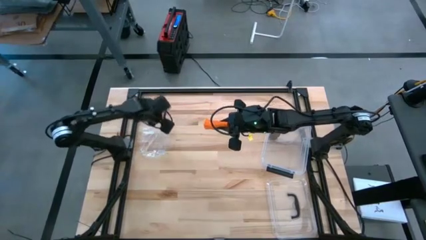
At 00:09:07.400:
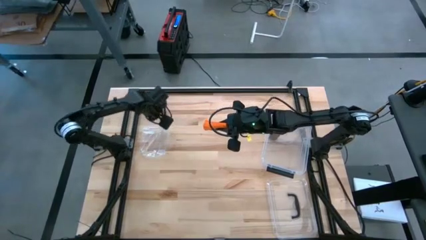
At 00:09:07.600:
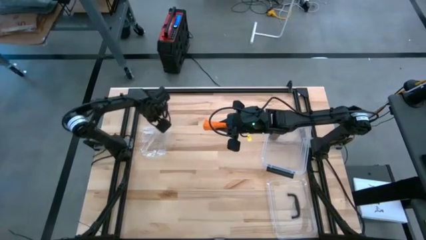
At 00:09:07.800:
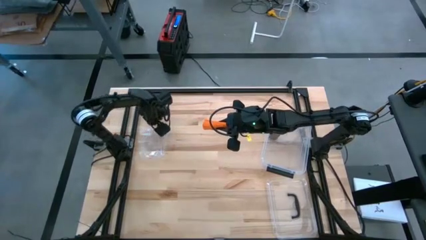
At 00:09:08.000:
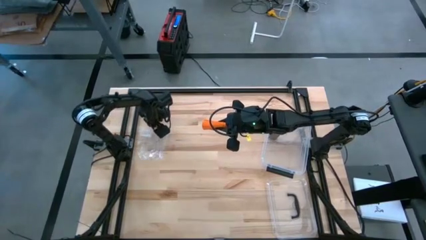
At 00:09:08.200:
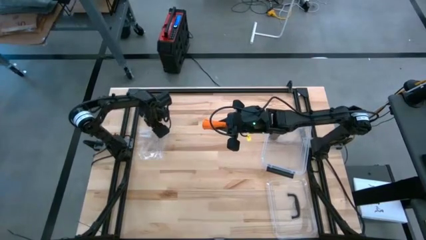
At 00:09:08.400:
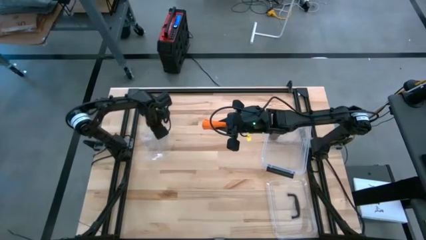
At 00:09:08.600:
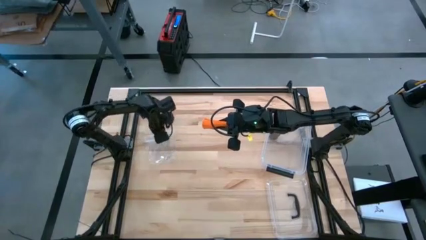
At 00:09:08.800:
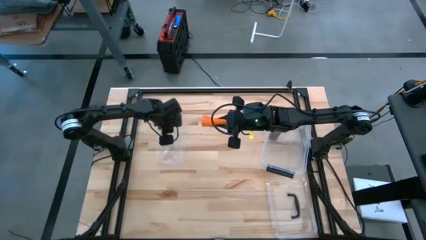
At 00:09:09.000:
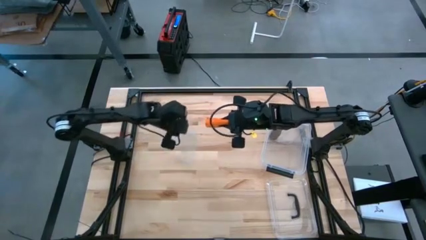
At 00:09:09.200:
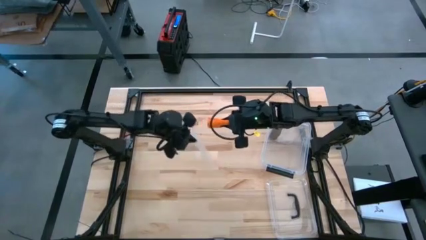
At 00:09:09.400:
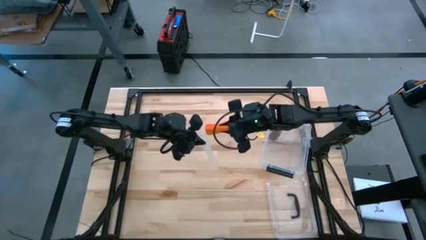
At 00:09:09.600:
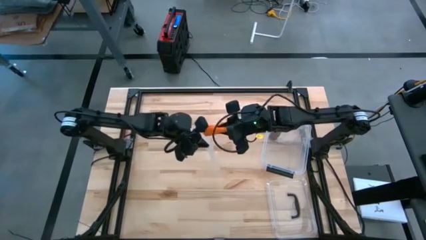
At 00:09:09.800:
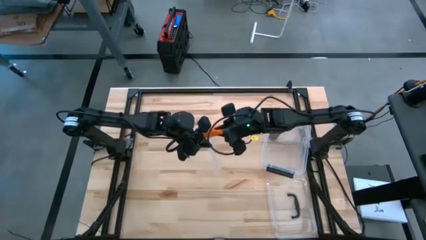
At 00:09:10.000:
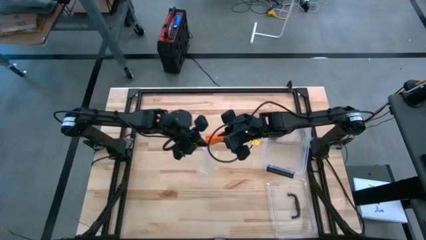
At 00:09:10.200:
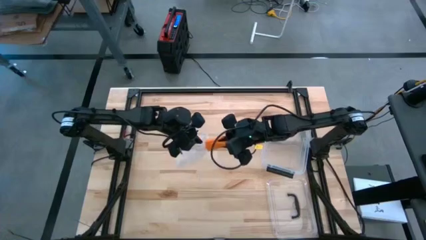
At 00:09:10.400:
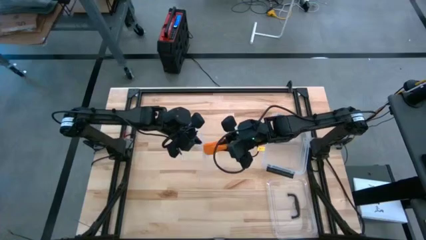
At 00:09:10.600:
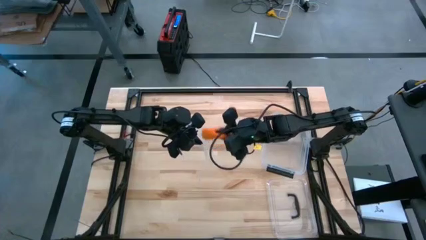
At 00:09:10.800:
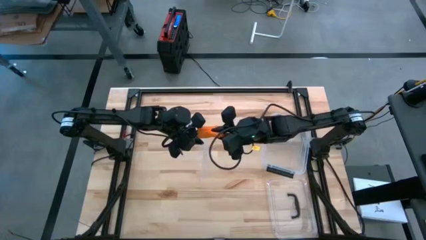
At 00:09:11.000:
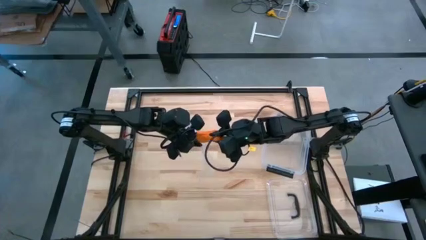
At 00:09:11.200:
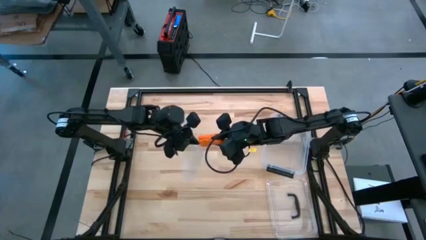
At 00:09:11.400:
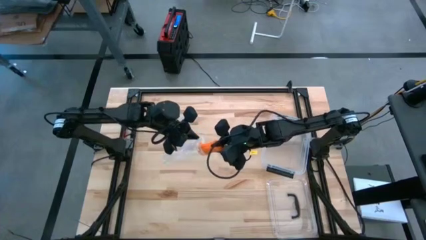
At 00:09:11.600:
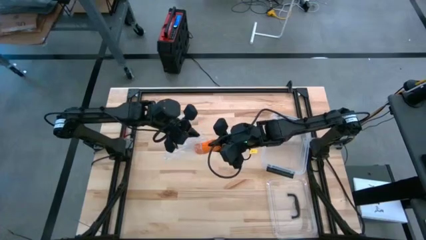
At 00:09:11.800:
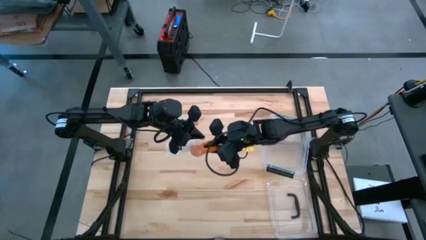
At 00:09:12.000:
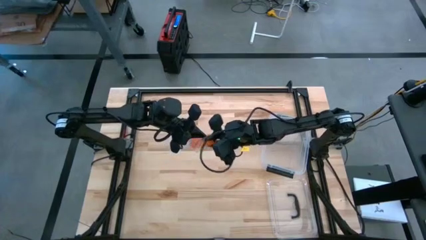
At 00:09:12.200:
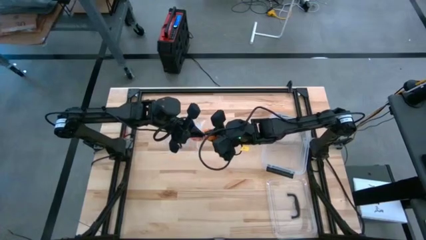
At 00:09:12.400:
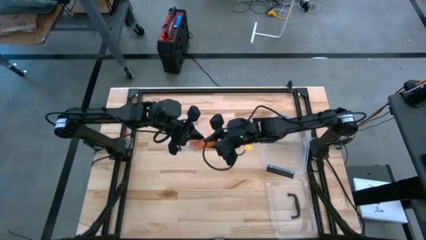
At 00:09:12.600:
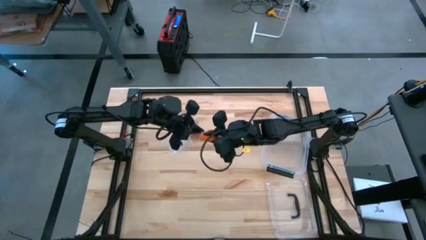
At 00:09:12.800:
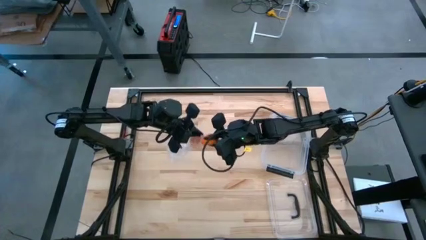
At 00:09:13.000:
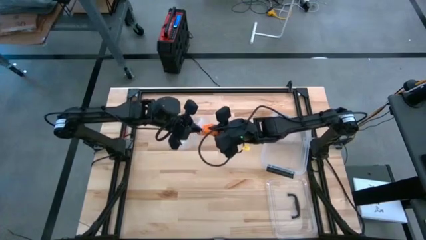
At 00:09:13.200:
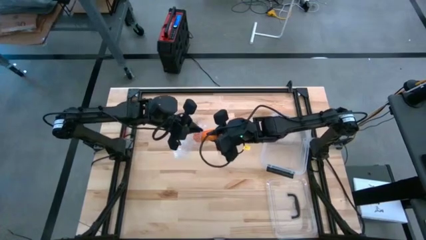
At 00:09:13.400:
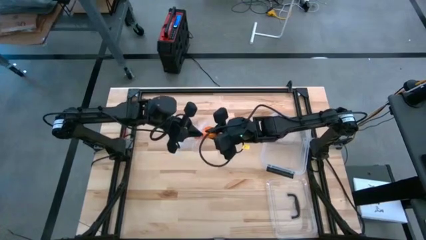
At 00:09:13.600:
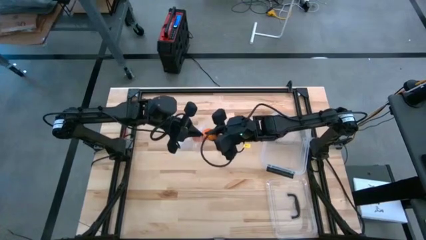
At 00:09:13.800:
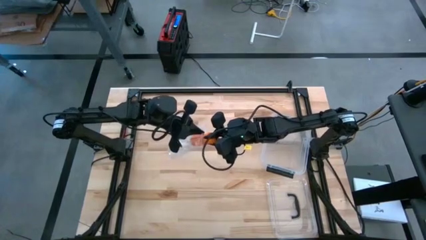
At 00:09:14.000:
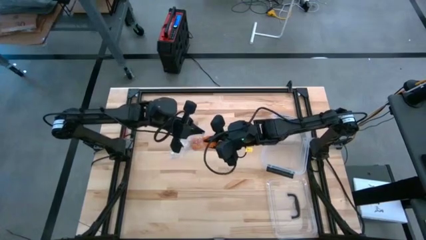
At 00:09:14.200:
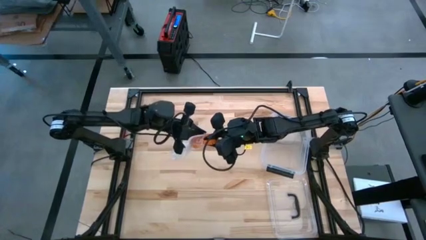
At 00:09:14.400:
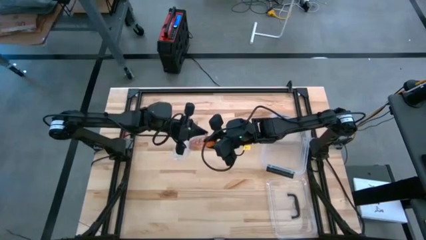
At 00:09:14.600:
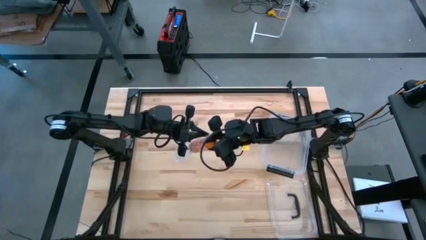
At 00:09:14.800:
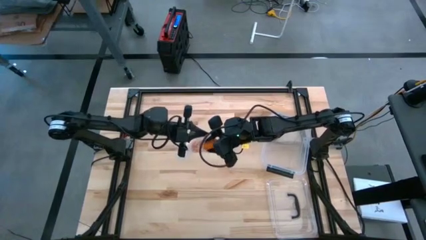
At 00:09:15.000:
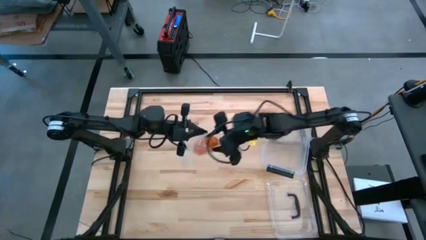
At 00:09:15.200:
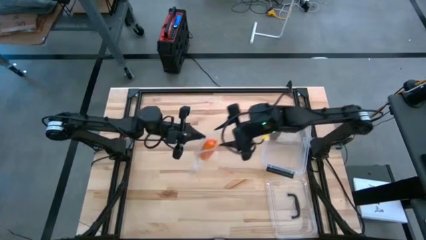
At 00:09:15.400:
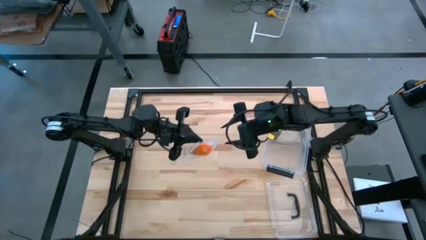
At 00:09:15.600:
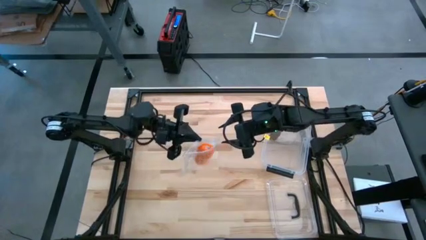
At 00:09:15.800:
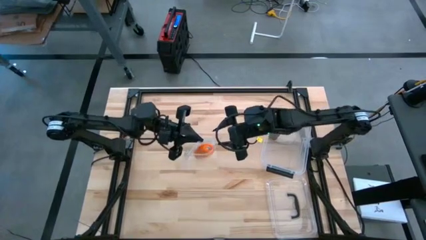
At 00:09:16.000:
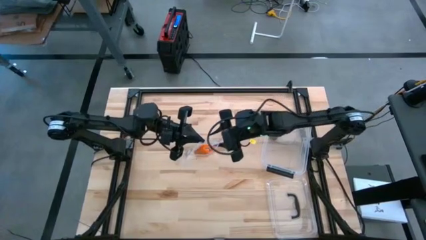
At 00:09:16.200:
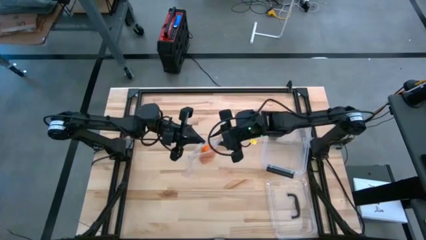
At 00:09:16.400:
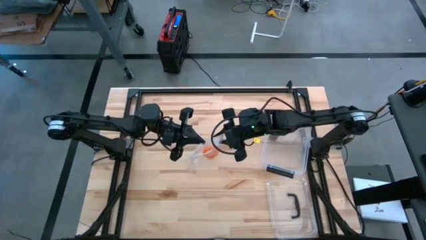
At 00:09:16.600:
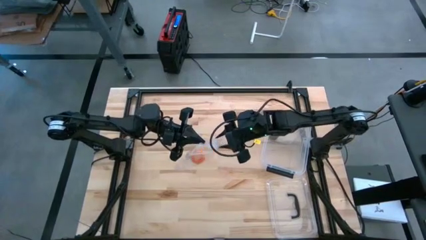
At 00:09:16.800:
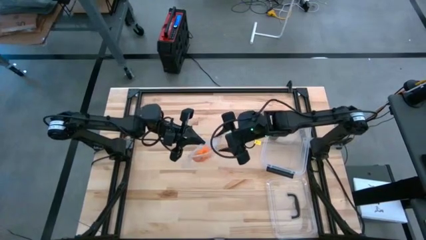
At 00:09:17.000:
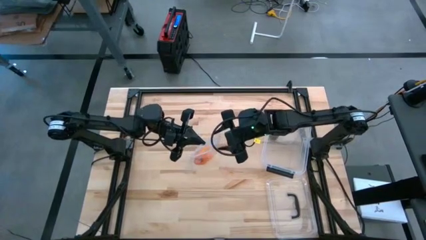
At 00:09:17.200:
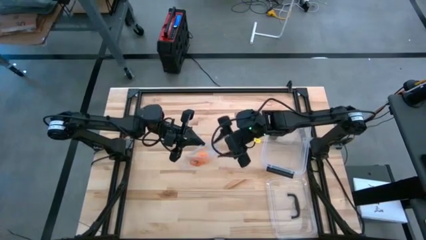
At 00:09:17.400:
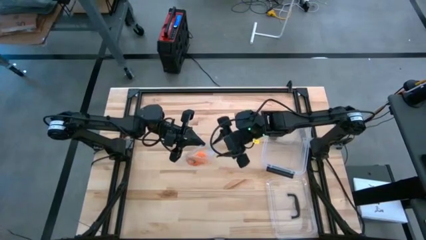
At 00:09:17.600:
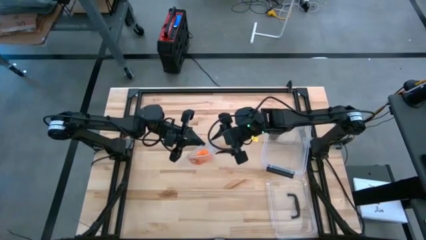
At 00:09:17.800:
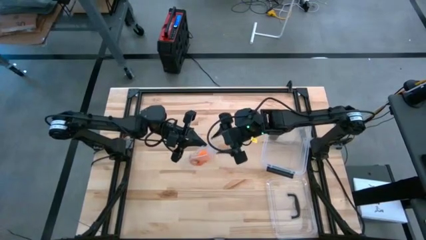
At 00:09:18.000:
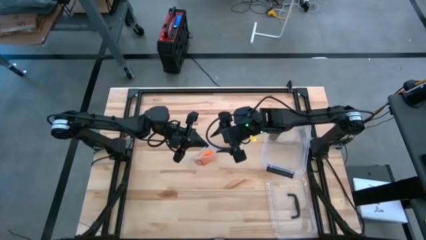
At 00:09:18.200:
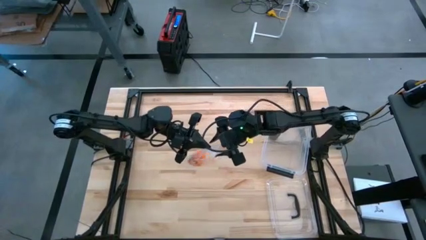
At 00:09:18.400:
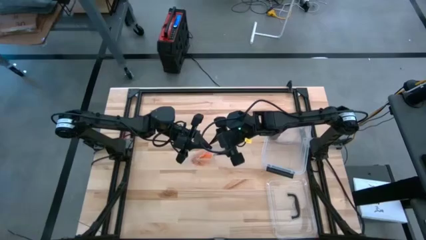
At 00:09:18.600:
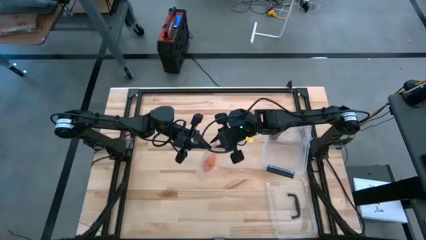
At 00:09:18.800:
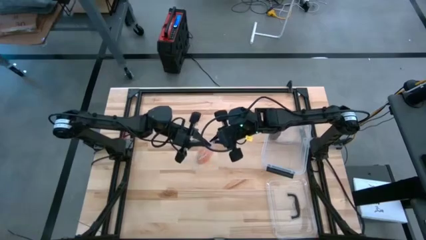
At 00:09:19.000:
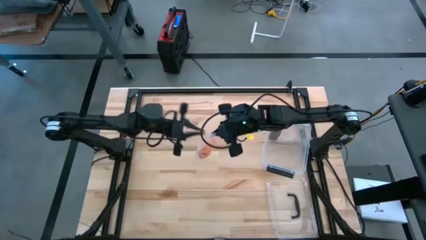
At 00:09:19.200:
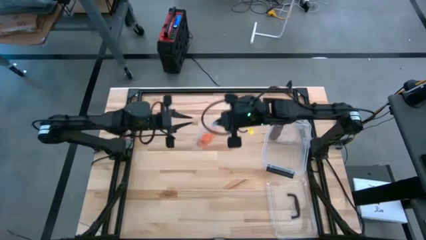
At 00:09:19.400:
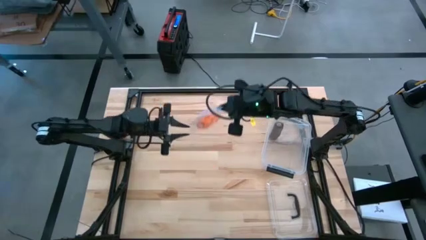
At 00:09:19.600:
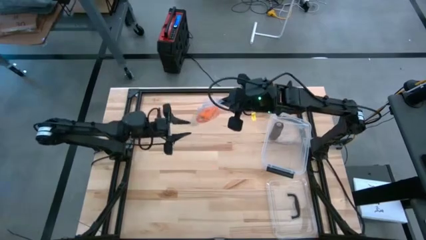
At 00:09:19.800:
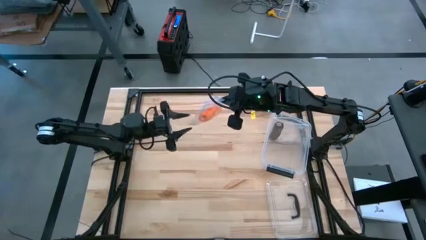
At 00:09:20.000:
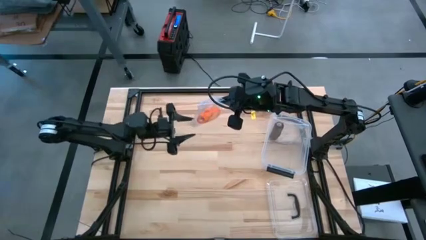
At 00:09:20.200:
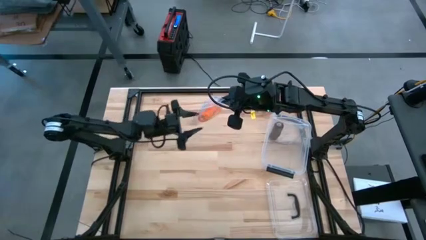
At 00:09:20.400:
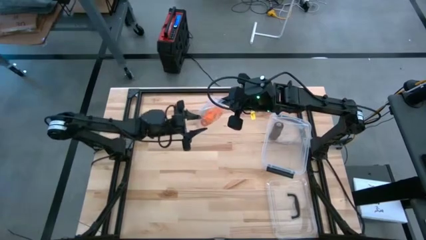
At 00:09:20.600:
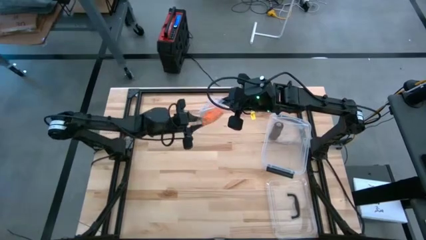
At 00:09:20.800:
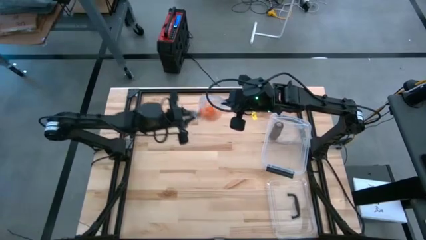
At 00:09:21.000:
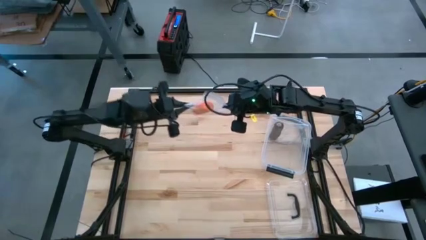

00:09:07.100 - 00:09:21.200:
Task: Roll bandage
Put the rolled orange bandage into the transparent zip bag
